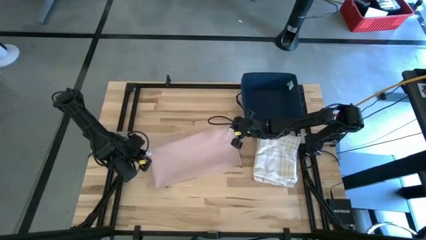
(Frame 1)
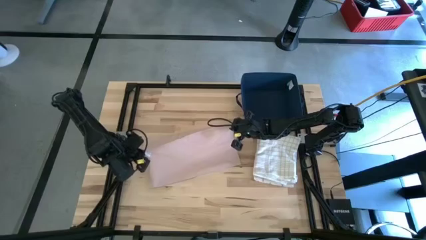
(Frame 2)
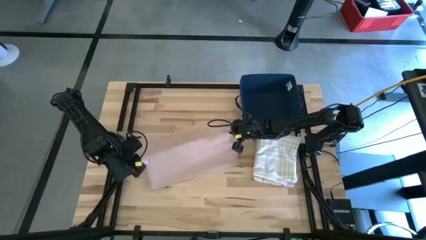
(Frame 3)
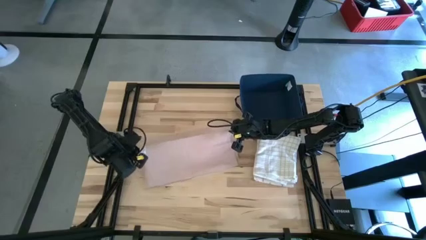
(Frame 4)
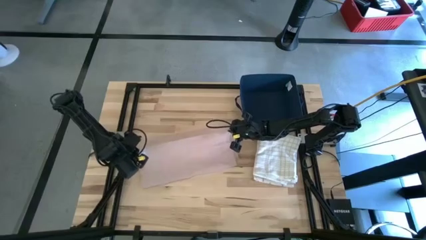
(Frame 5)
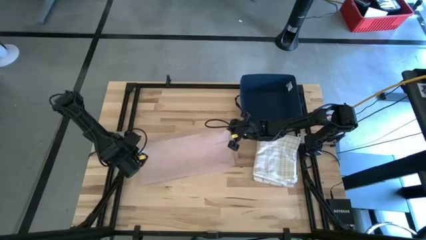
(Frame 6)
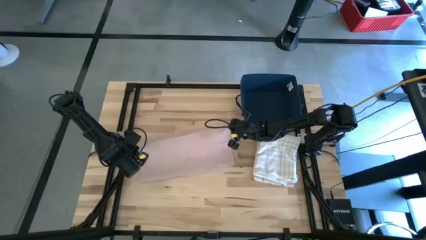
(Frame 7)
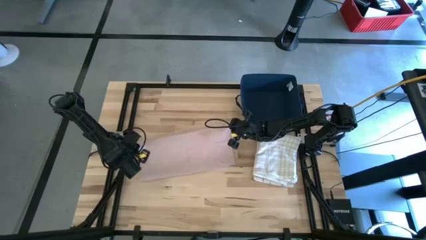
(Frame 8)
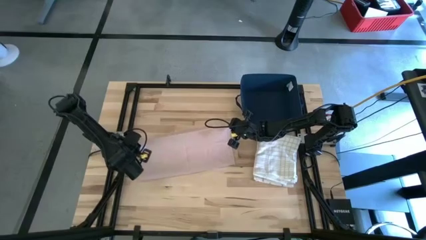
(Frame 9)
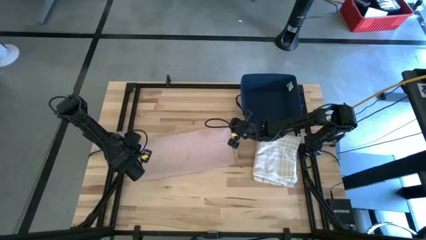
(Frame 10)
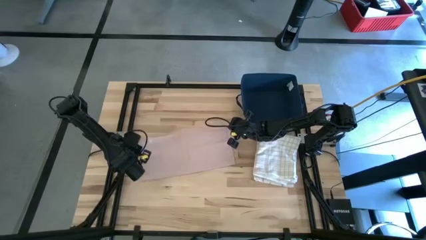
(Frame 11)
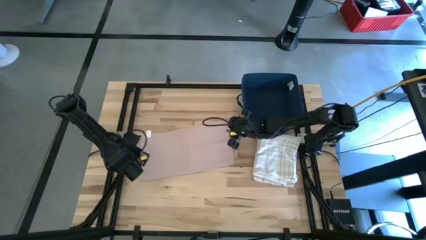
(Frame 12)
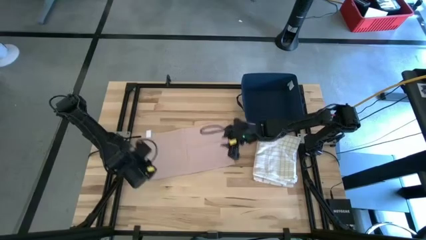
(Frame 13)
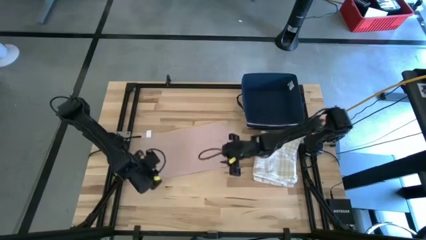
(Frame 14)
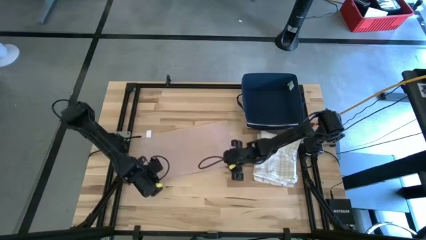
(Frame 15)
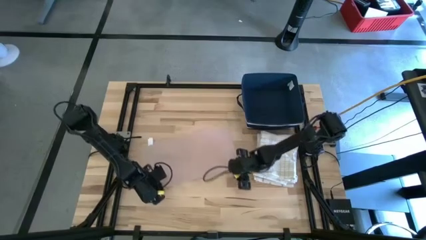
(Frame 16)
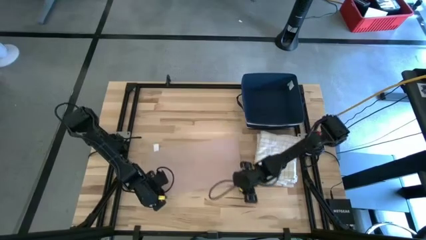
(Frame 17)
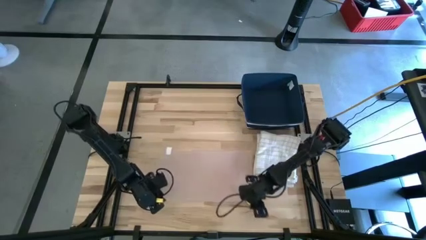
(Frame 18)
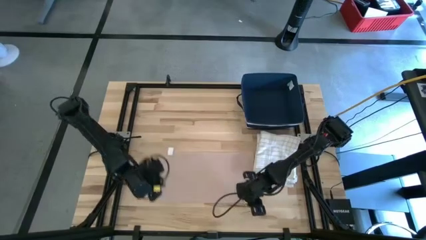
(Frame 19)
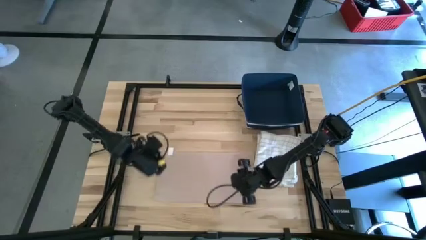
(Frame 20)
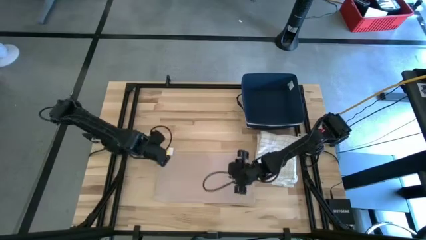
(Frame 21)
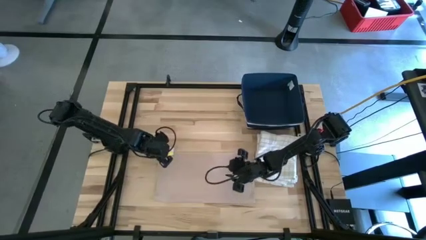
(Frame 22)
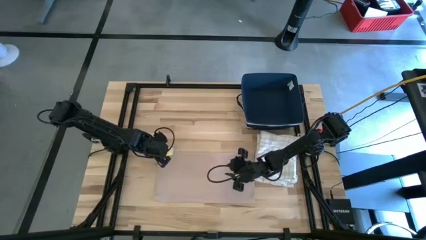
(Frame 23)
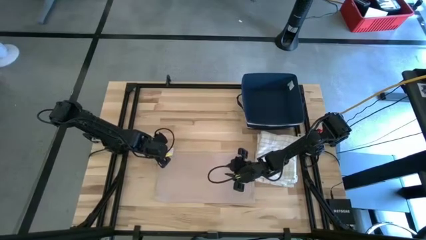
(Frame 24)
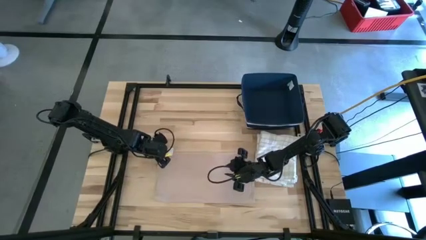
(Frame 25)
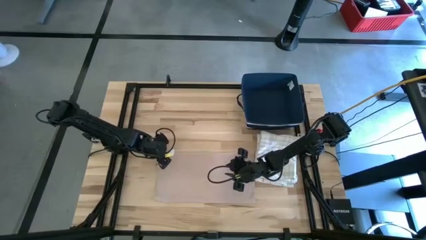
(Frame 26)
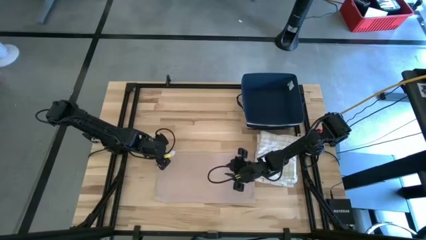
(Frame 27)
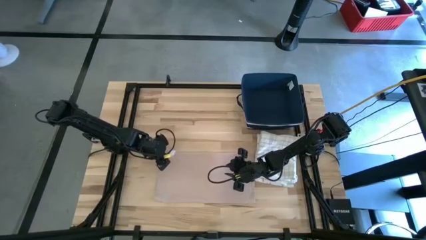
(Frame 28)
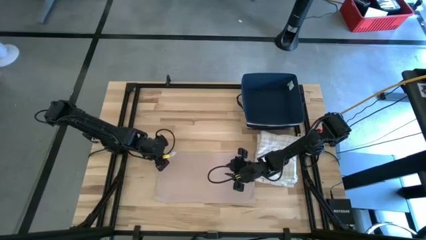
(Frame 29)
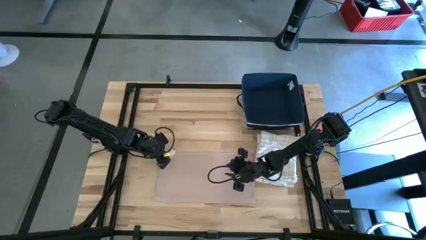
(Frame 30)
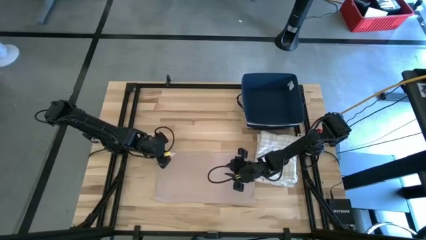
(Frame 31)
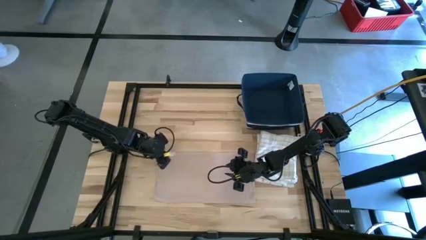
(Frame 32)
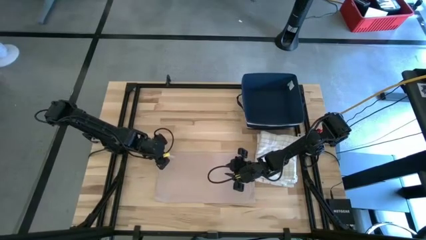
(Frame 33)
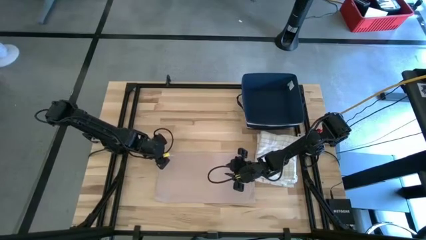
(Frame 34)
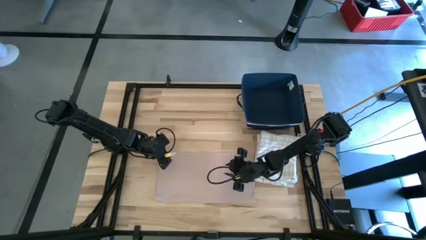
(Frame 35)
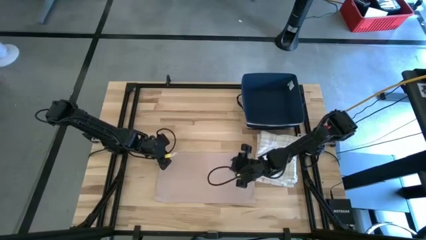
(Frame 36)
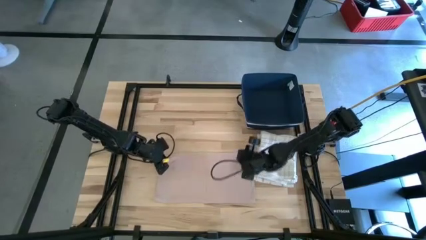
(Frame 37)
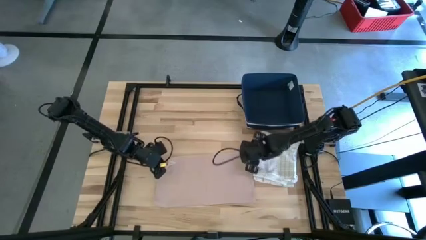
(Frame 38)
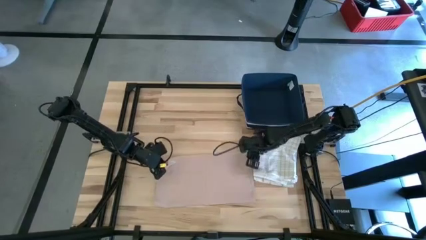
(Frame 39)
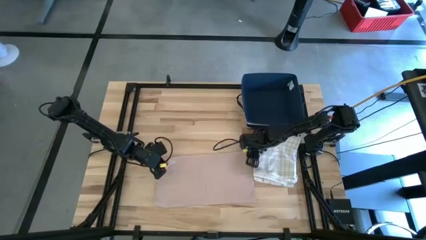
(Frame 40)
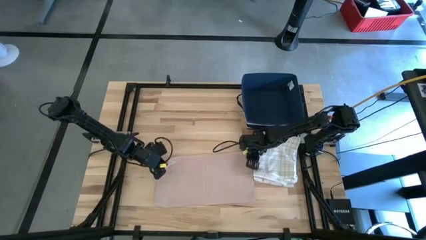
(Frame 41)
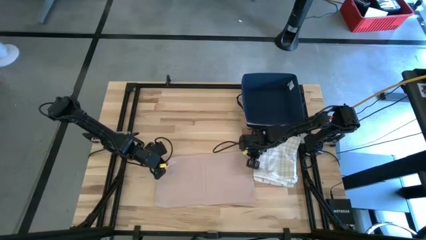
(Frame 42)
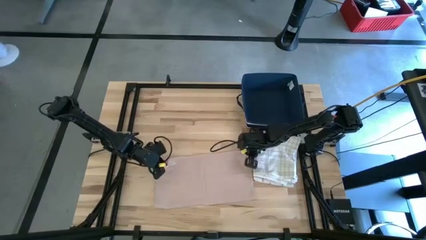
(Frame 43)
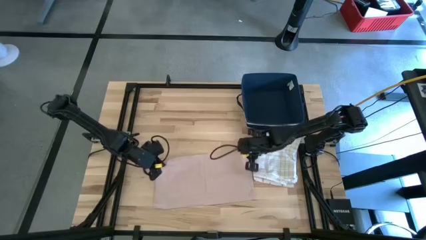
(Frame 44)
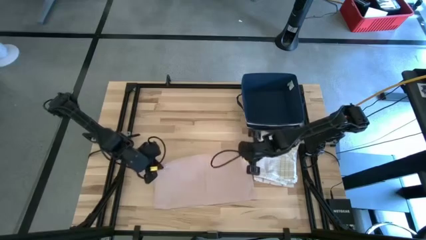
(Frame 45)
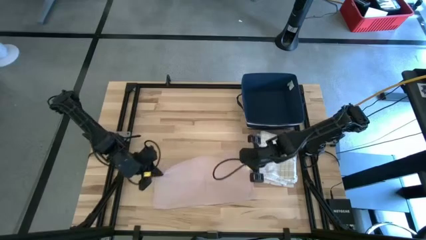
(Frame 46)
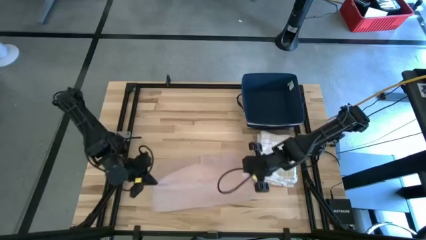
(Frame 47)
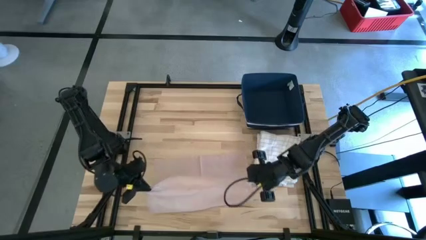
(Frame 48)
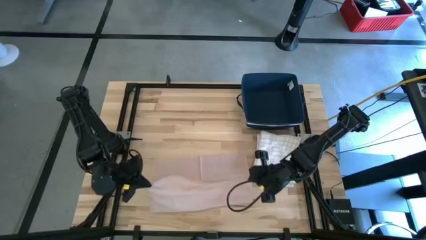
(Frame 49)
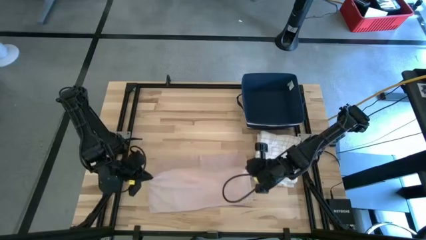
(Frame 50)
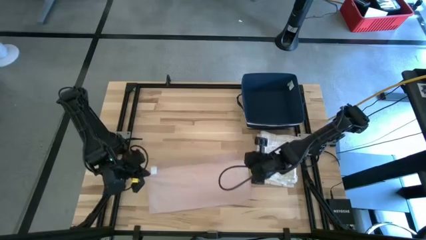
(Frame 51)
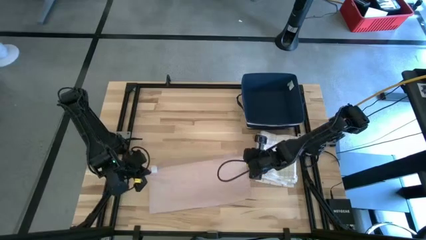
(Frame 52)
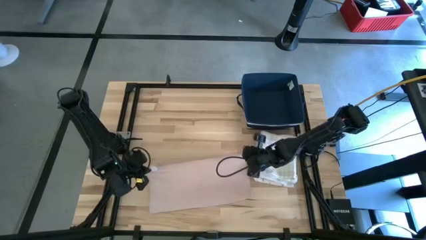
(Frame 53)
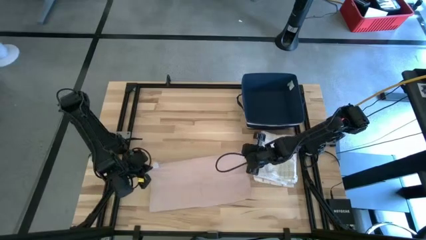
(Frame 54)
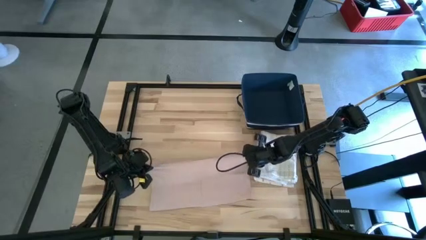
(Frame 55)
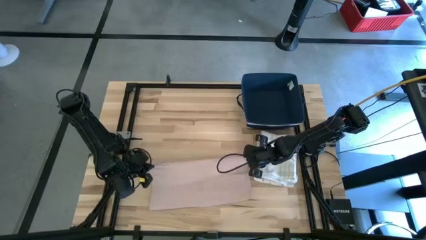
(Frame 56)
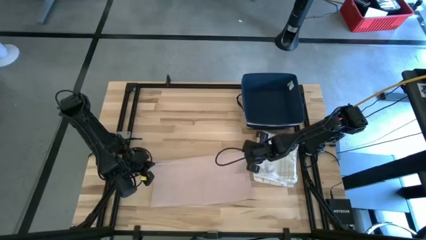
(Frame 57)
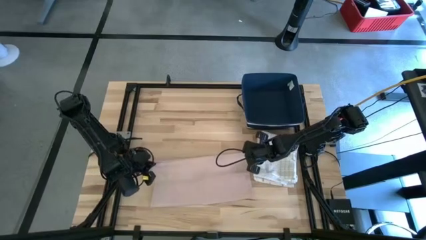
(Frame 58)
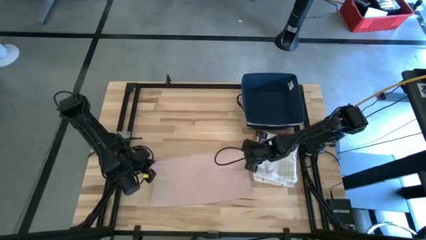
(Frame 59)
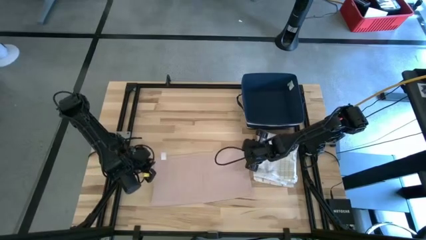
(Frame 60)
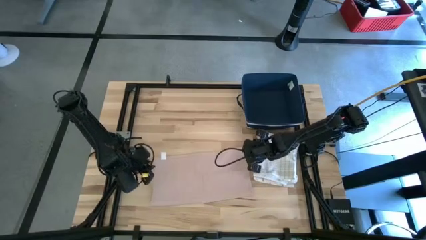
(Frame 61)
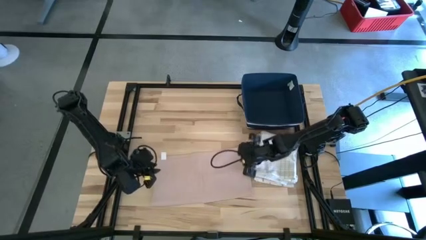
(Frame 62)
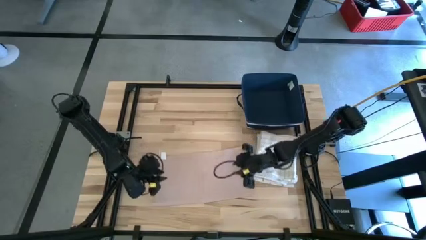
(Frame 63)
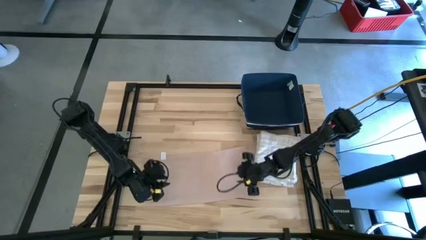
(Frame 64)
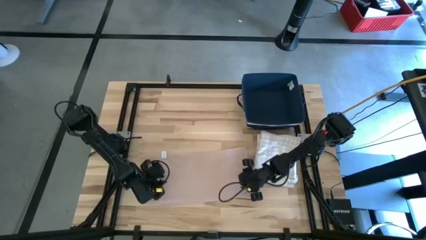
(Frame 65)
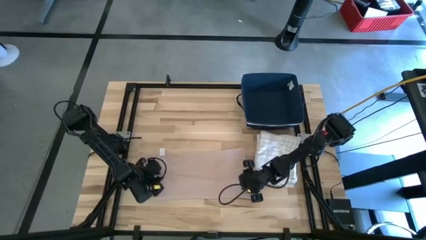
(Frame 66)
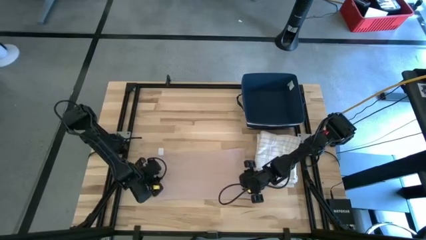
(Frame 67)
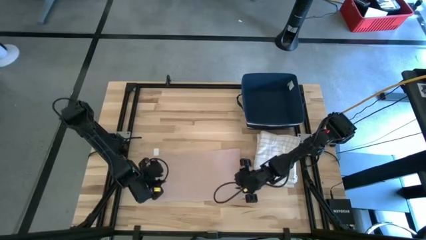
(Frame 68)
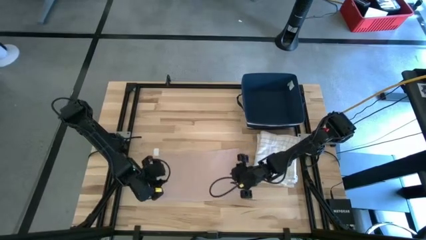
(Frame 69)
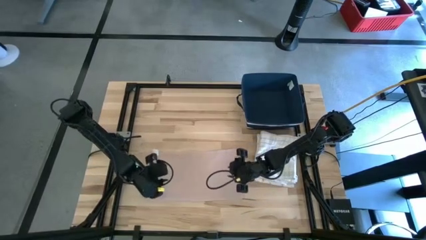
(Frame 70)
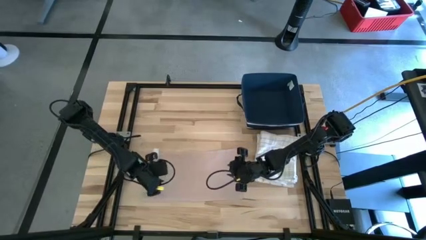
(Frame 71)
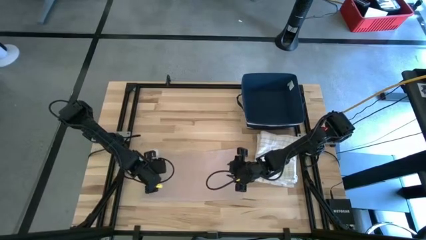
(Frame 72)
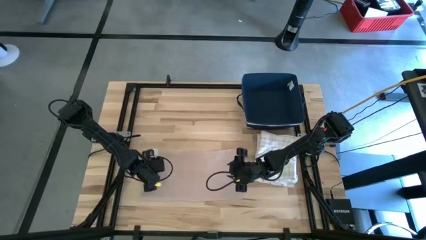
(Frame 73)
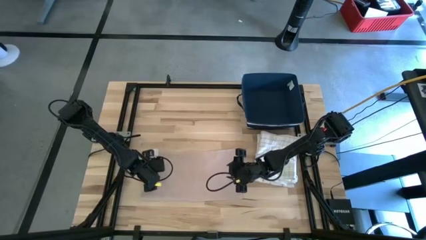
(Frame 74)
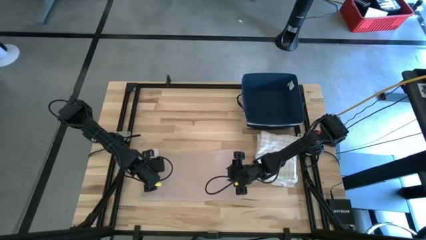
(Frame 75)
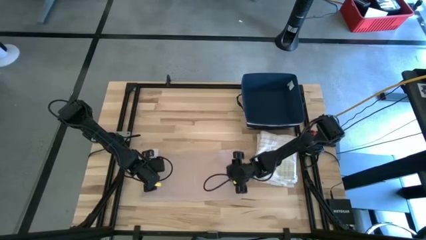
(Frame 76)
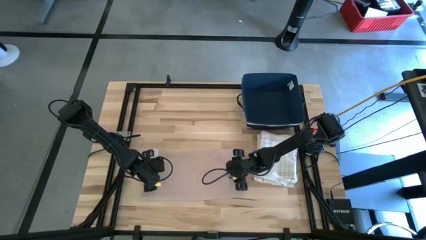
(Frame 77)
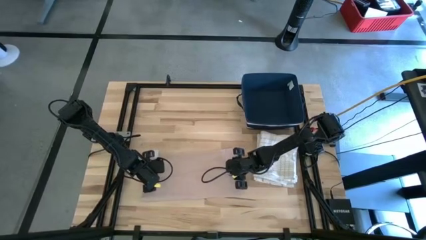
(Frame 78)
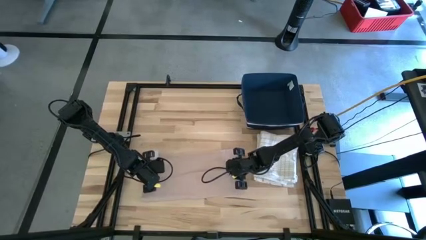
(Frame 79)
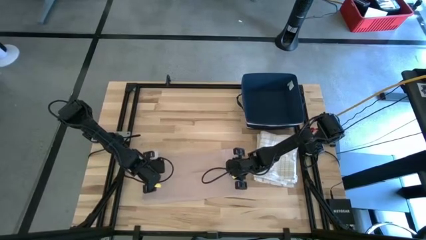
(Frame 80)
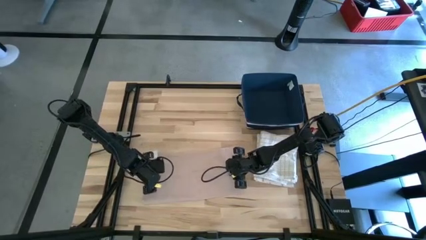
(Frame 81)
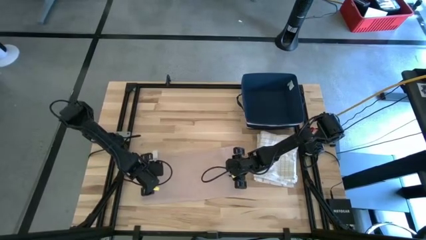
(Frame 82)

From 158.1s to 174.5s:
Task: Fold towel
Fold the light brown towel
